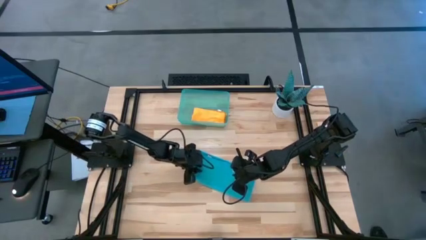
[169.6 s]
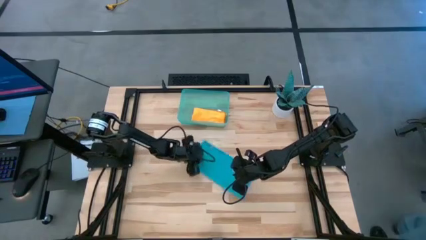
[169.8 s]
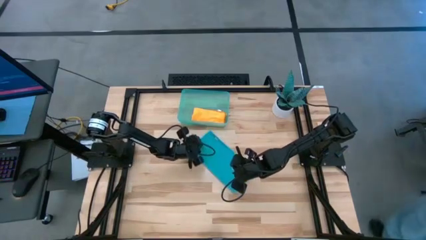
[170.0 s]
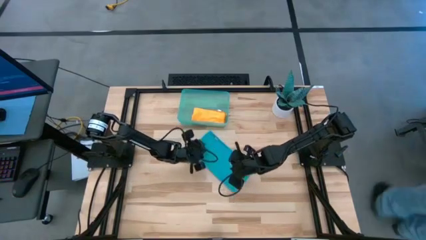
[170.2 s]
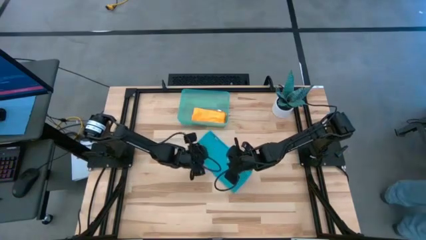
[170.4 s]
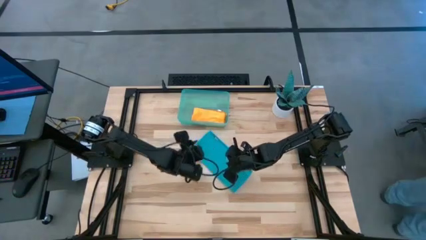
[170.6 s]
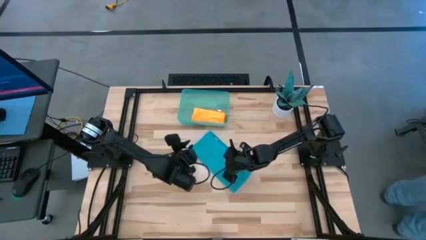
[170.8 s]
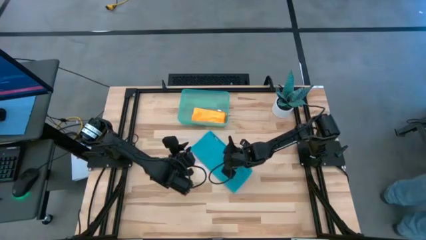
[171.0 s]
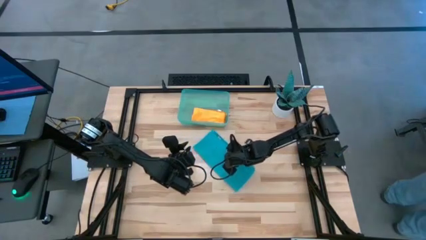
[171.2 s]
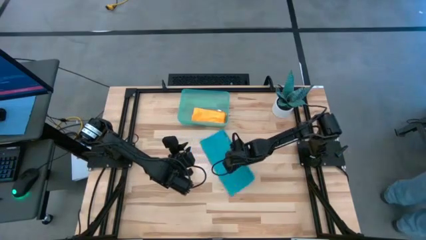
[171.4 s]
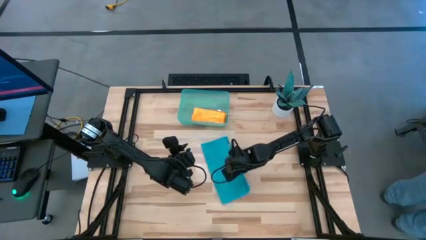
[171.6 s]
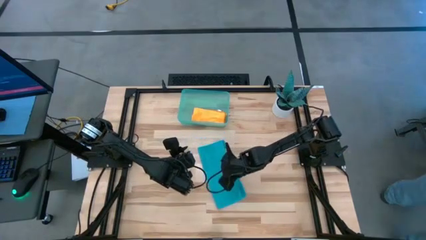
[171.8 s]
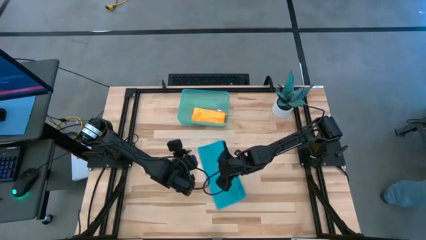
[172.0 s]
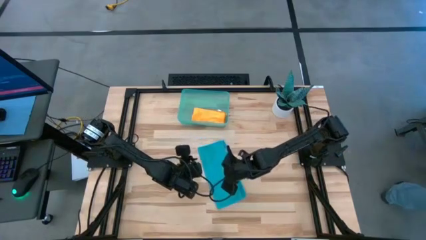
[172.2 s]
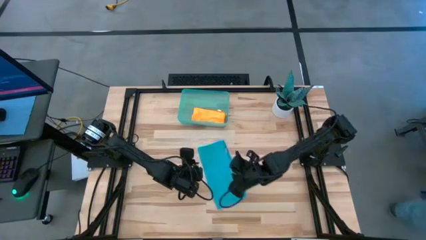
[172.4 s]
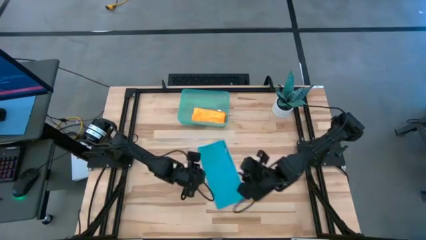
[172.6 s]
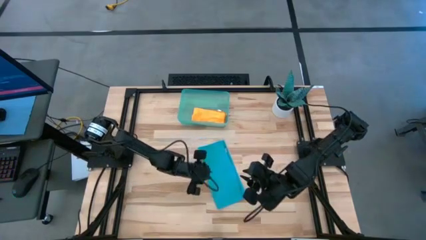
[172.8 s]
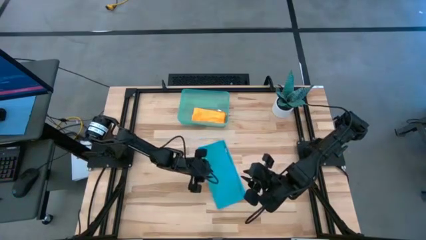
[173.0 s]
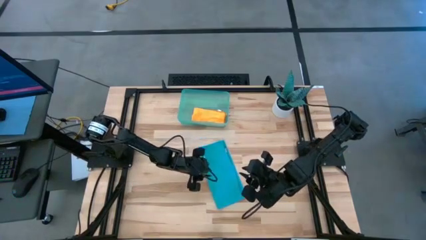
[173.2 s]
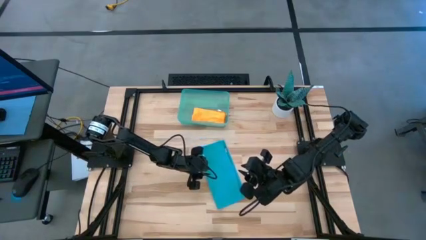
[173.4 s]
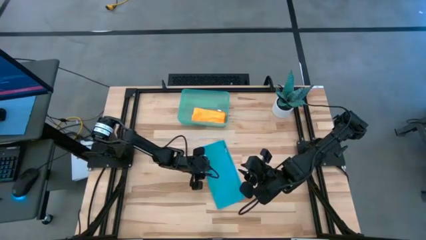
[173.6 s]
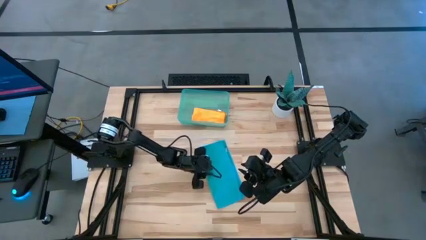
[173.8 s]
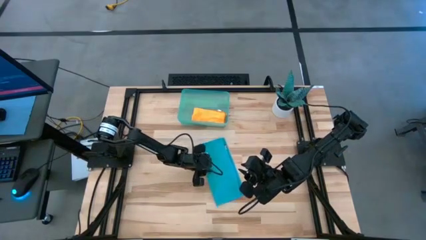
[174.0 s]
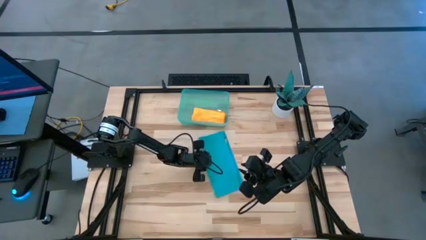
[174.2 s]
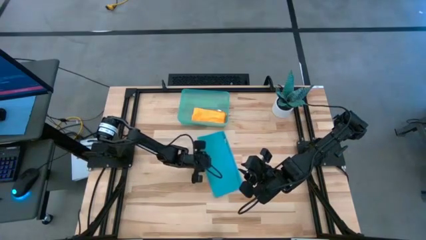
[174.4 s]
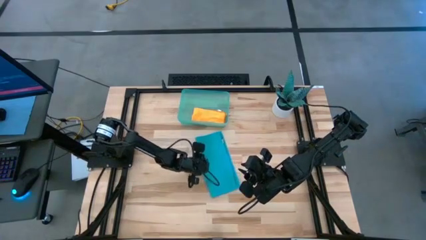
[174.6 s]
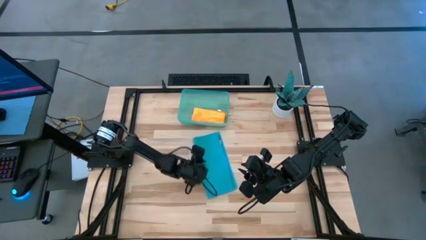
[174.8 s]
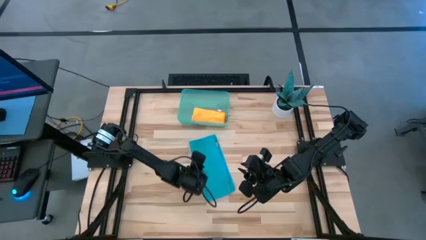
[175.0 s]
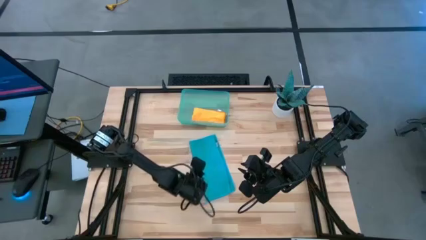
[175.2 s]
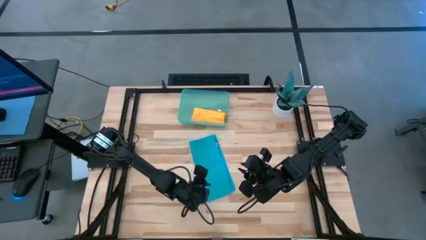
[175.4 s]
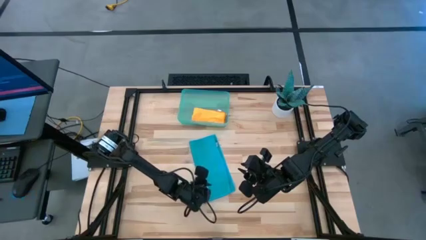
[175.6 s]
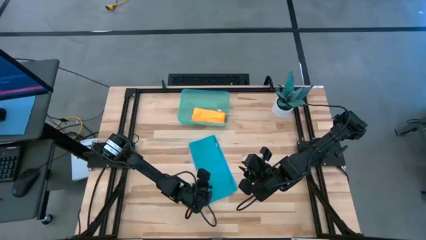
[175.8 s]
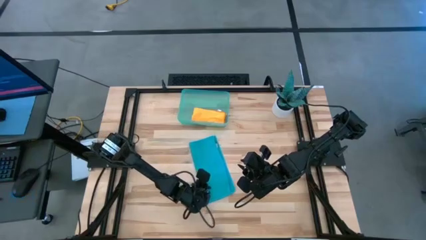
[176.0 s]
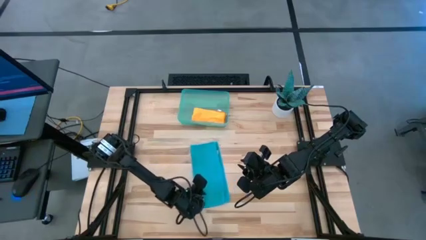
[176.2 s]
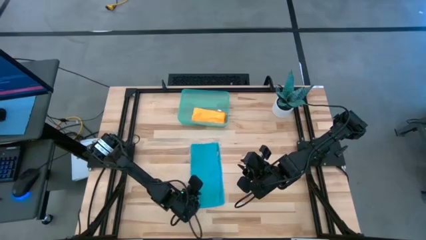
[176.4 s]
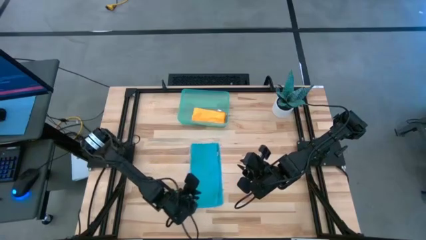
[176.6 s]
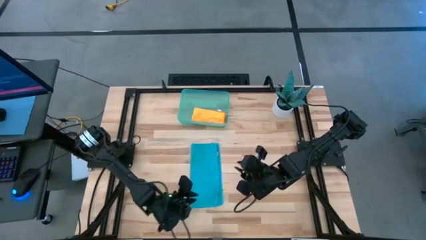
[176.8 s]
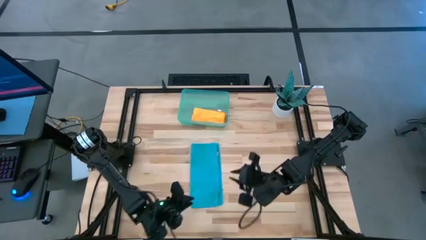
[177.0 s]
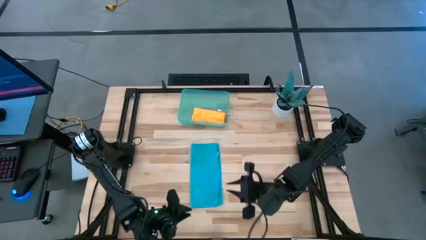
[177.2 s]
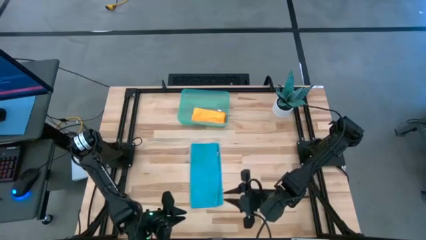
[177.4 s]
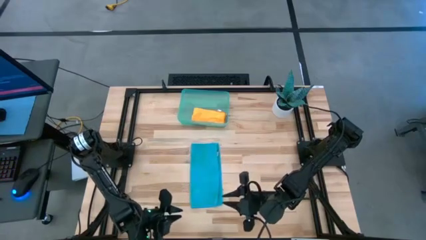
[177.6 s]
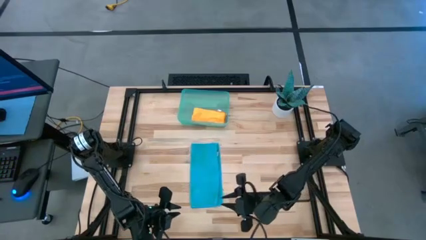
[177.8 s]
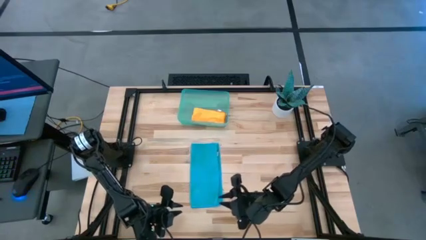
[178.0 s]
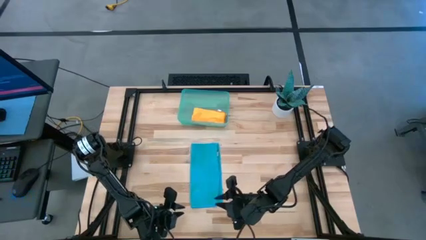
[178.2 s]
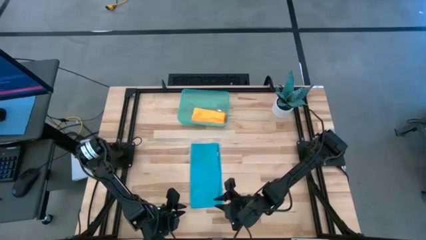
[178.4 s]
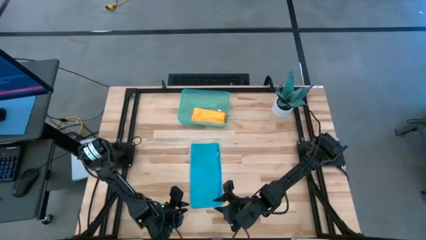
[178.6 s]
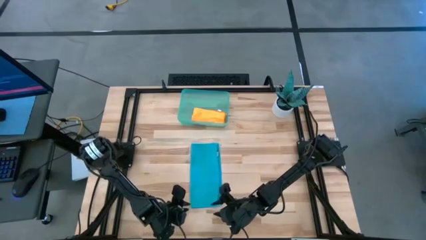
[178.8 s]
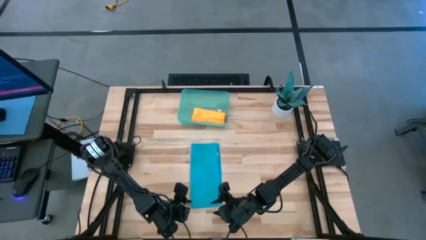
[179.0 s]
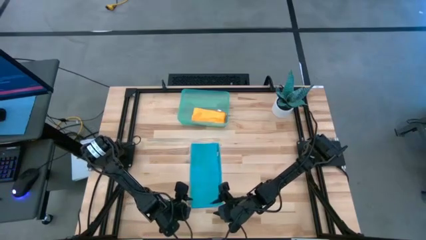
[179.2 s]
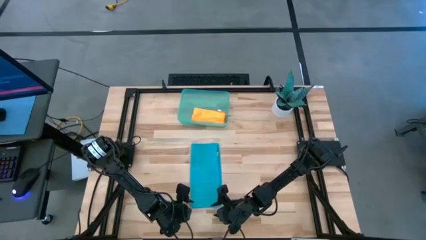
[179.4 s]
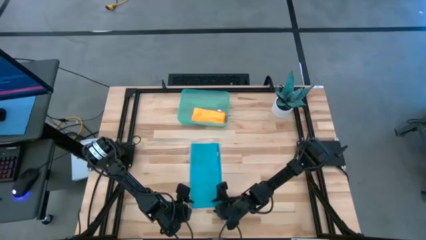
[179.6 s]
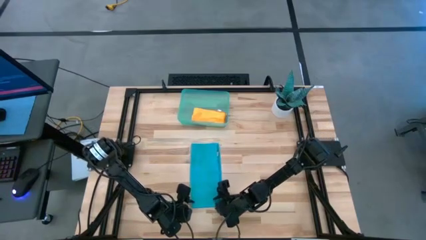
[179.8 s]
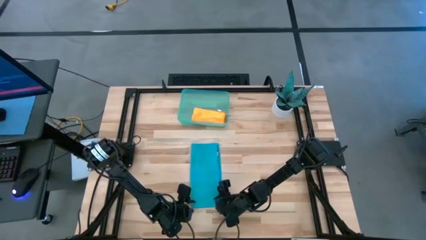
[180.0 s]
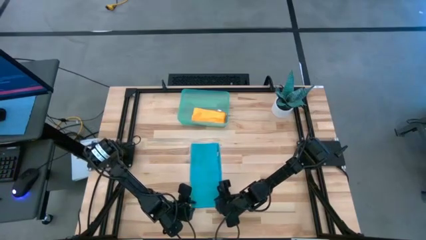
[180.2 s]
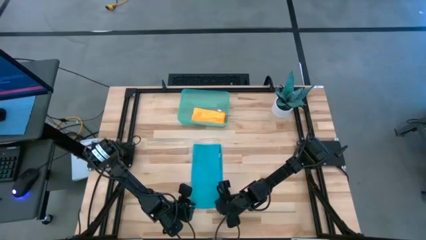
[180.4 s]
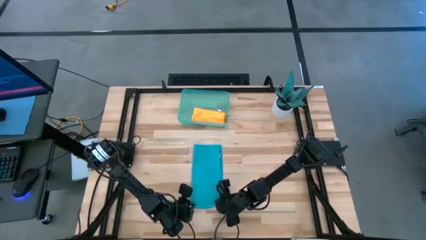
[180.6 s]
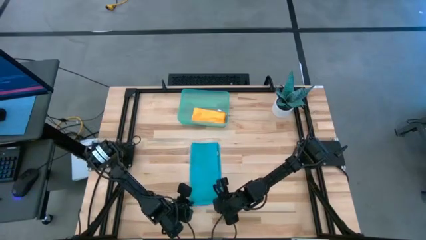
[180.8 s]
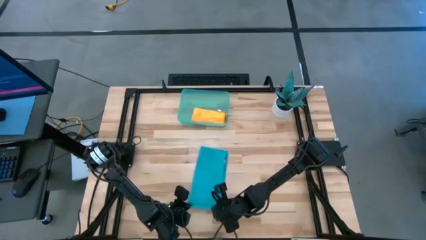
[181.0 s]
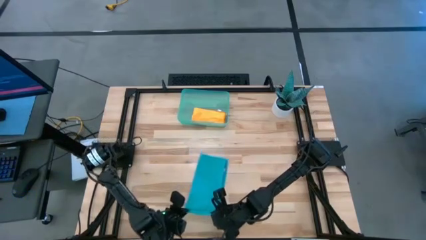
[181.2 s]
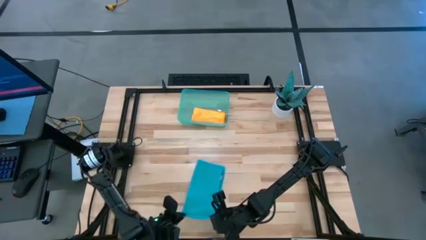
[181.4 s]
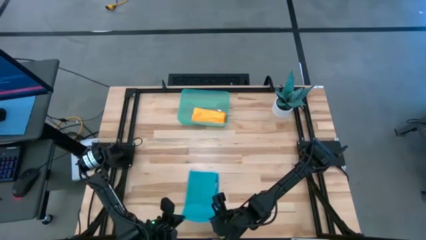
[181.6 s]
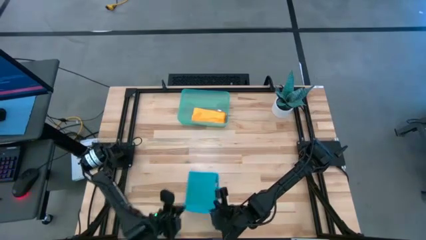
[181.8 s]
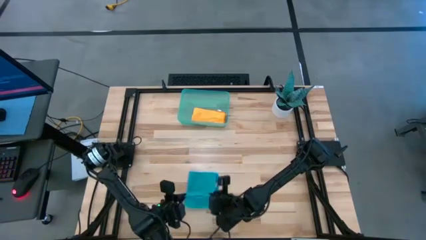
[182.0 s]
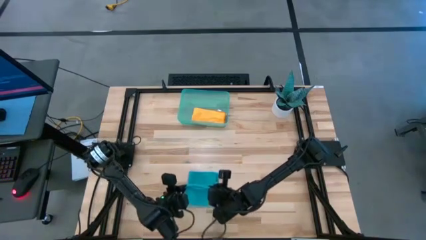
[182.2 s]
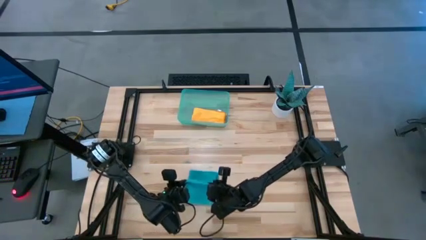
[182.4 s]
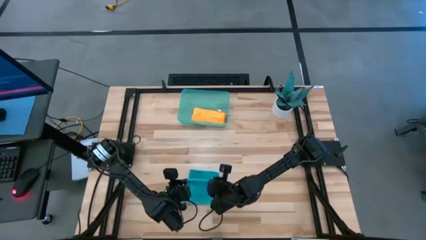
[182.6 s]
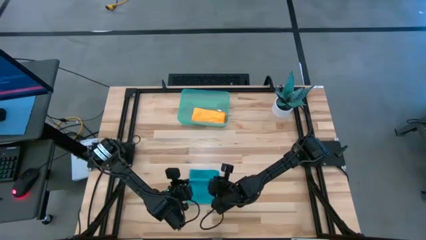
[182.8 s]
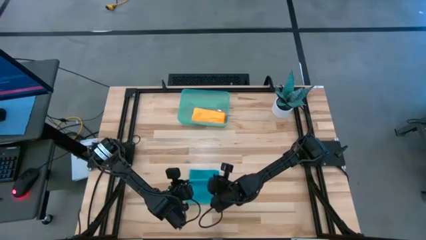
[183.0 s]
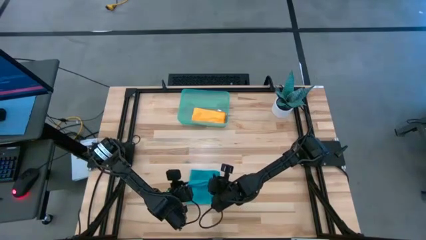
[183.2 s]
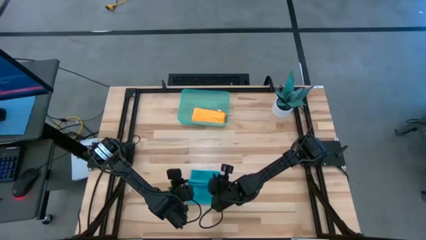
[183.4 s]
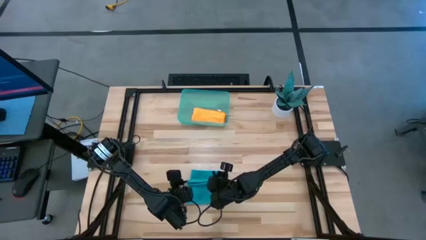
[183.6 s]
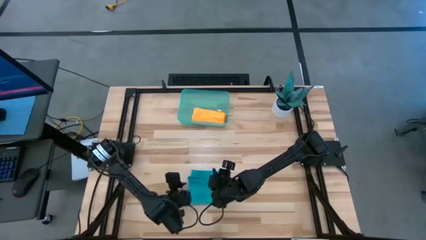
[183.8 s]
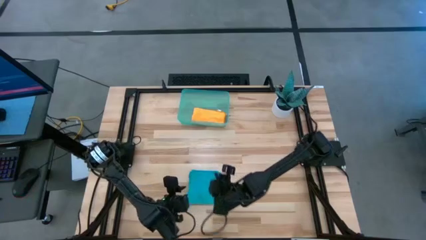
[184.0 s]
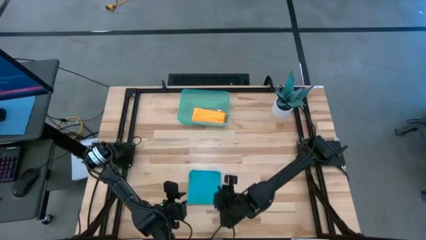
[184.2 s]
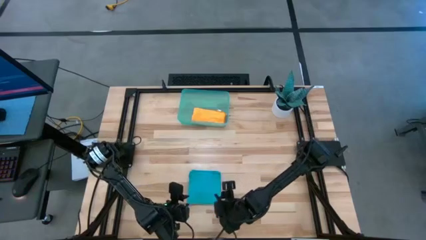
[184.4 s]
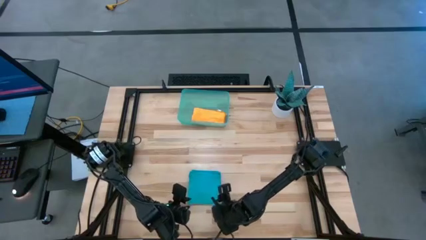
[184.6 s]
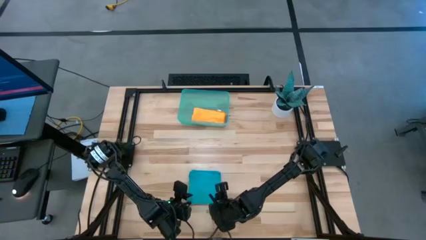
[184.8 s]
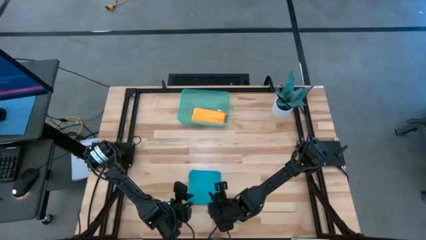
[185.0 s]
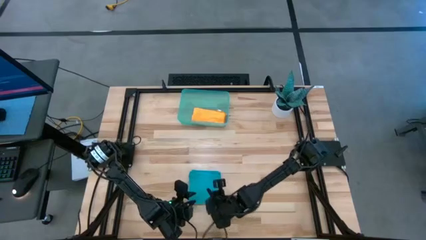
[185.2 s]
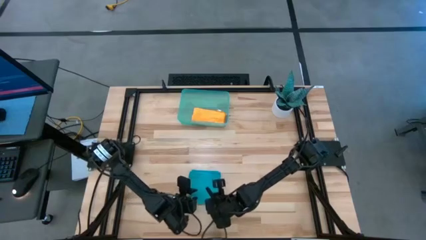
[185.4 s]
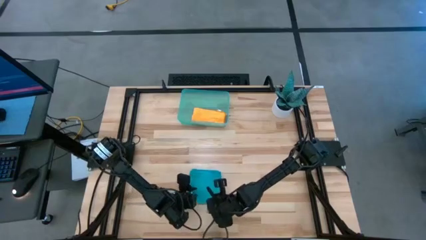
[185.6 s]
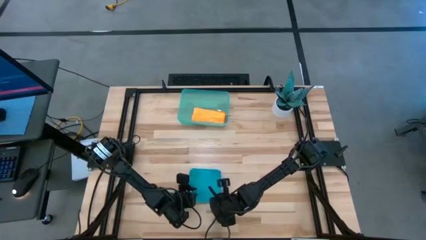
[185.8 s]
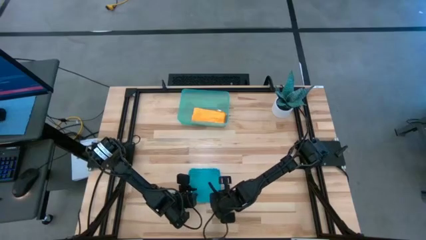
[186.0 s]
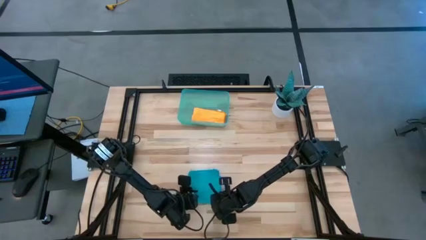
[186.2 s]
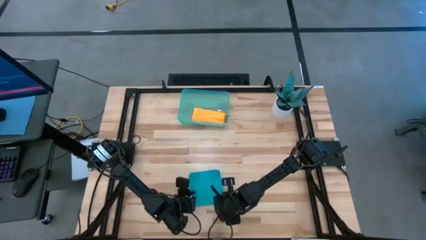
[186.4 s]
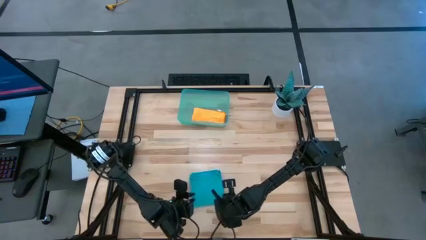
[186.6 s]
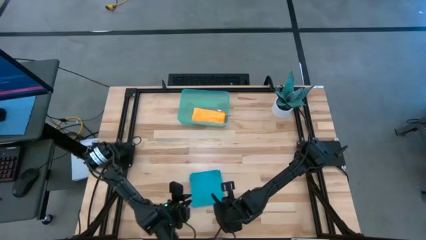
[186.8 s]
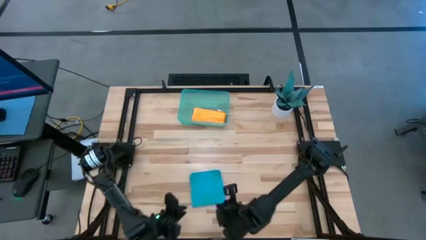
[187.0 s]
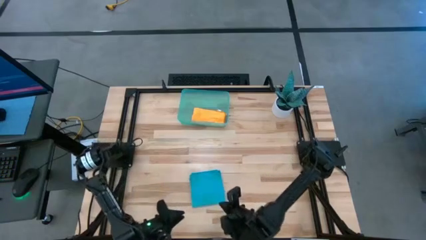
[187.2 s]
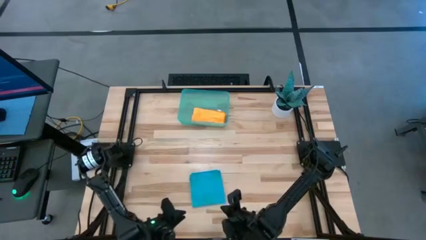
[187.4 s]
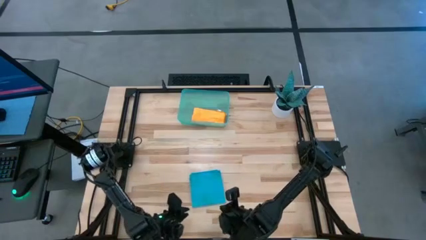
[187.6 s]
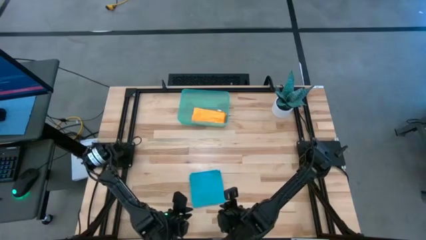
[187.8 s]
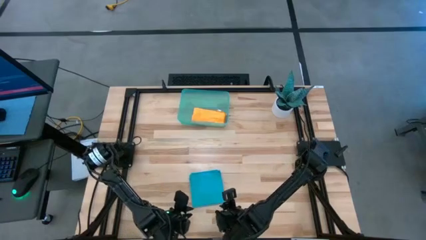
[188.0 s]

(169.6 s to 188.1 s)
Task: Roll microfiber towels into tight, uniform cylinder then place into a basket
Roll the blue microfiber towel
